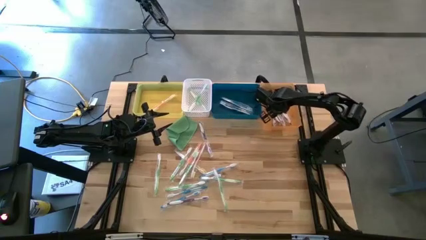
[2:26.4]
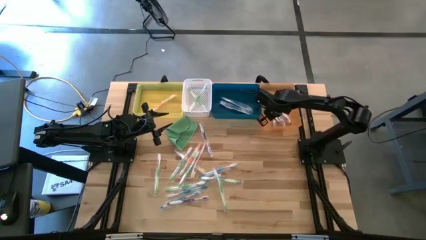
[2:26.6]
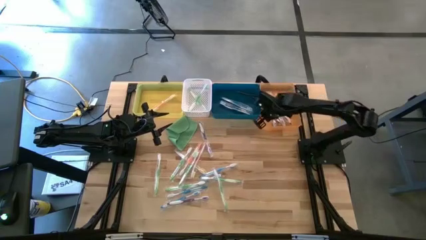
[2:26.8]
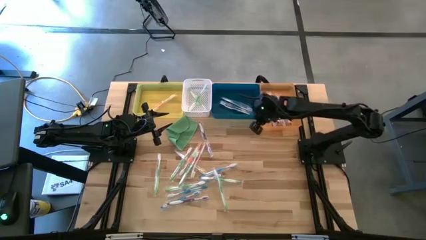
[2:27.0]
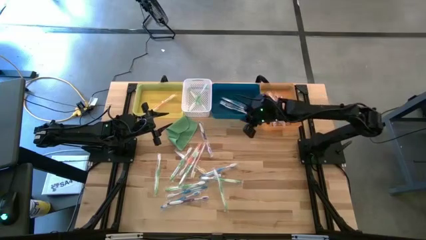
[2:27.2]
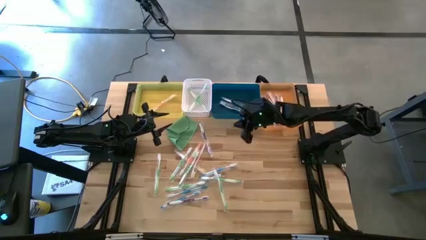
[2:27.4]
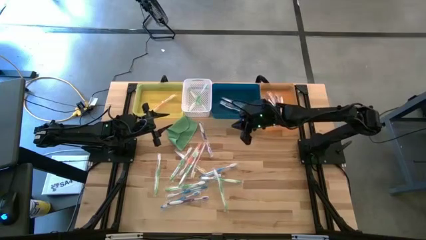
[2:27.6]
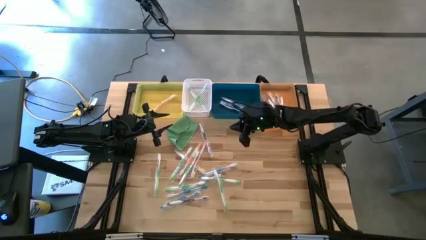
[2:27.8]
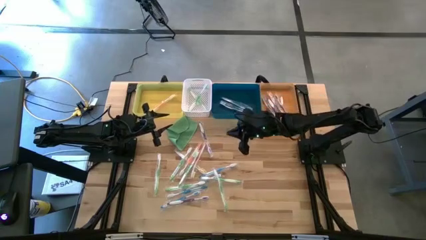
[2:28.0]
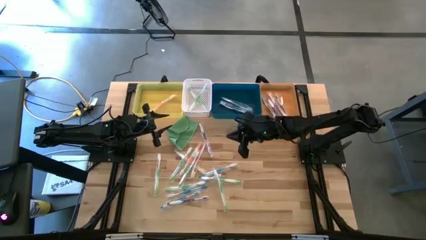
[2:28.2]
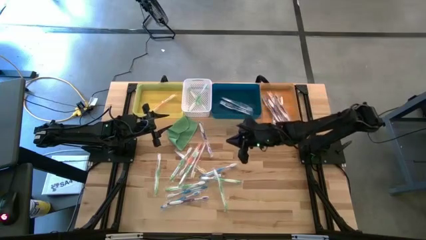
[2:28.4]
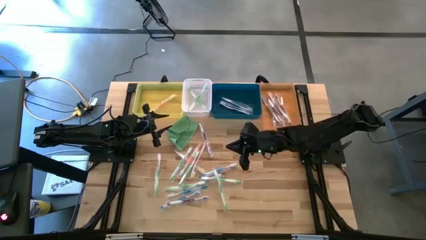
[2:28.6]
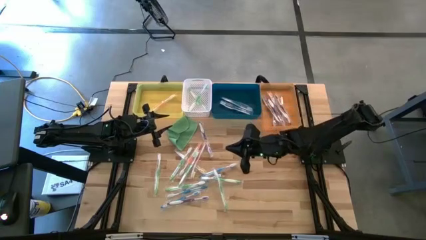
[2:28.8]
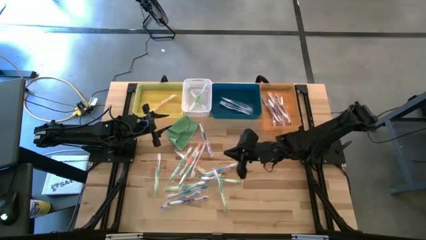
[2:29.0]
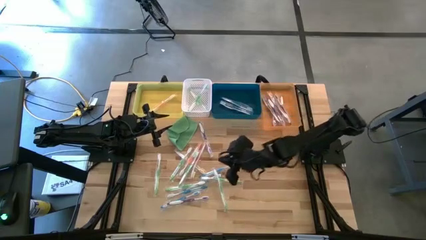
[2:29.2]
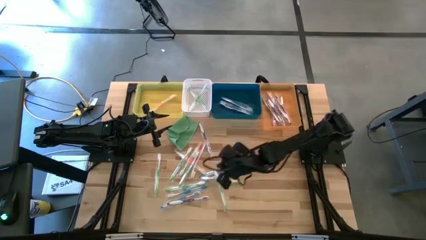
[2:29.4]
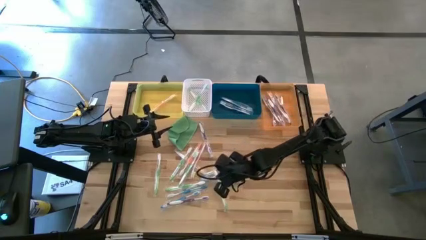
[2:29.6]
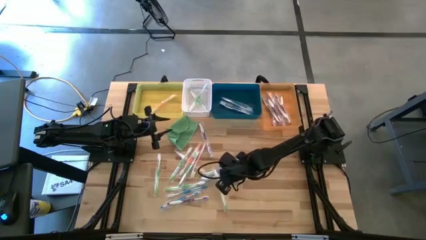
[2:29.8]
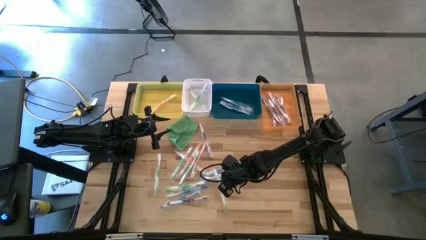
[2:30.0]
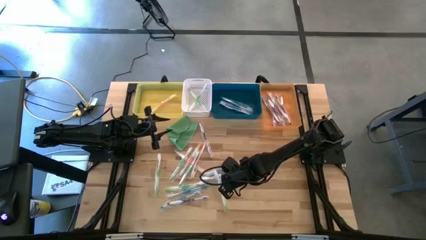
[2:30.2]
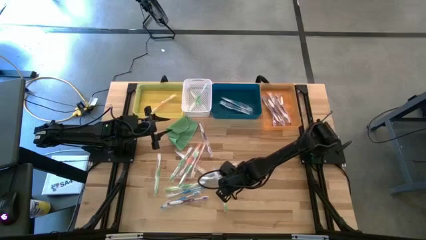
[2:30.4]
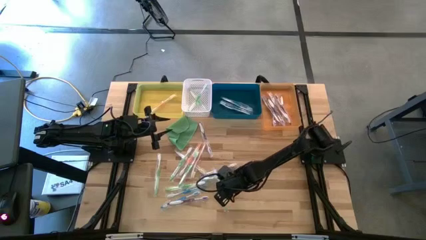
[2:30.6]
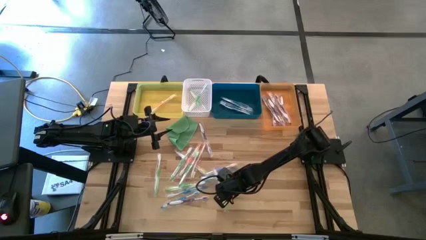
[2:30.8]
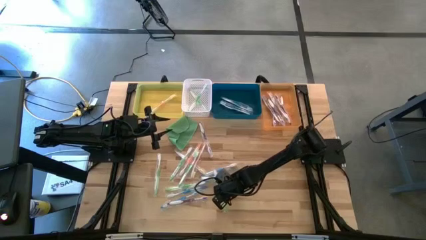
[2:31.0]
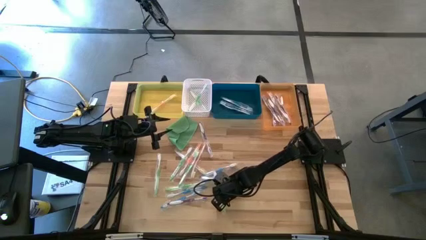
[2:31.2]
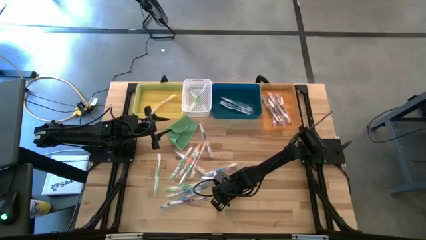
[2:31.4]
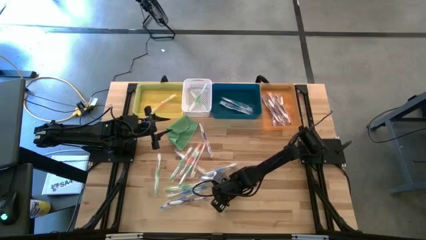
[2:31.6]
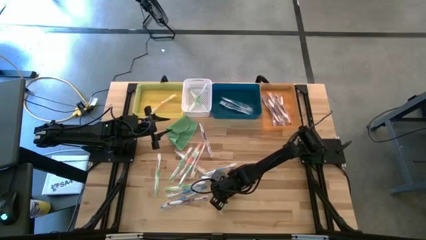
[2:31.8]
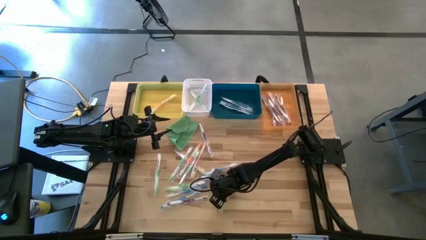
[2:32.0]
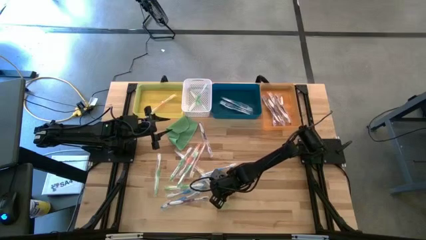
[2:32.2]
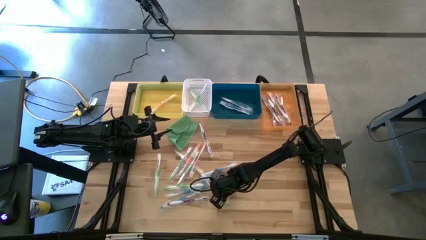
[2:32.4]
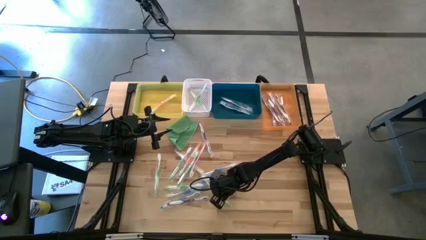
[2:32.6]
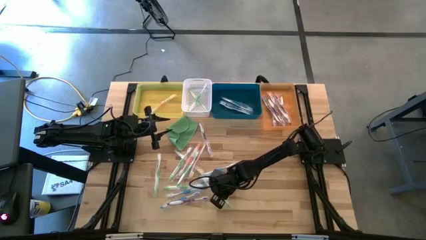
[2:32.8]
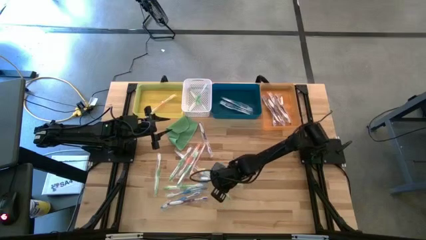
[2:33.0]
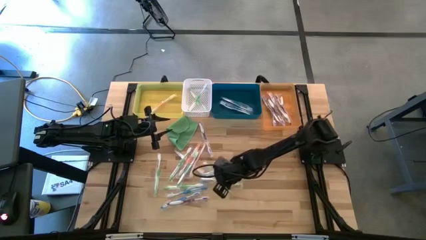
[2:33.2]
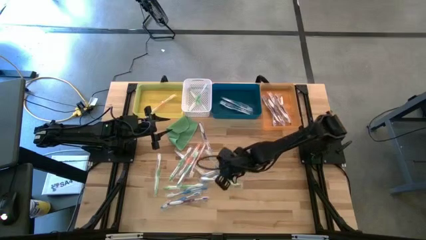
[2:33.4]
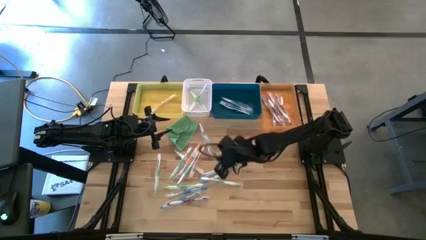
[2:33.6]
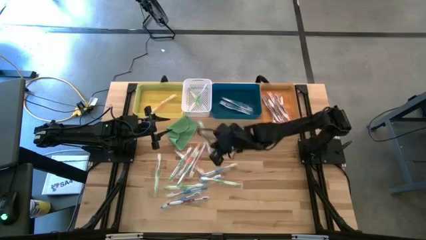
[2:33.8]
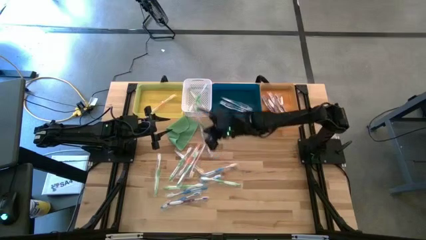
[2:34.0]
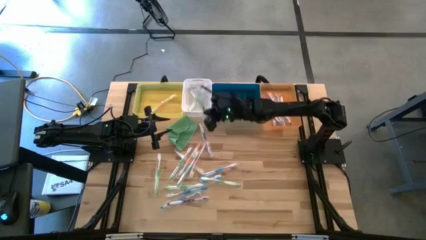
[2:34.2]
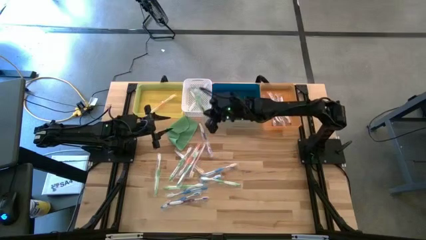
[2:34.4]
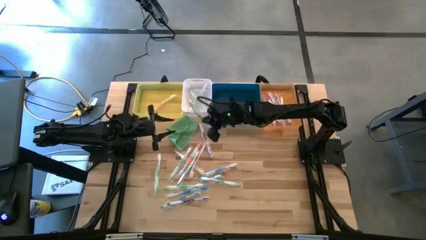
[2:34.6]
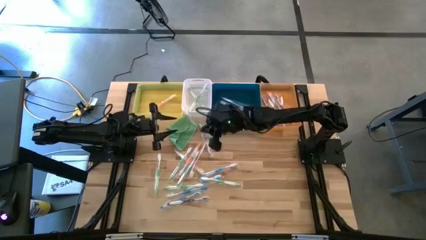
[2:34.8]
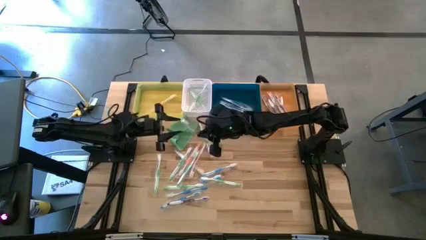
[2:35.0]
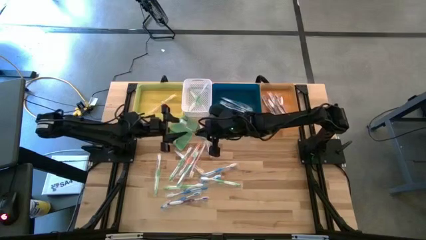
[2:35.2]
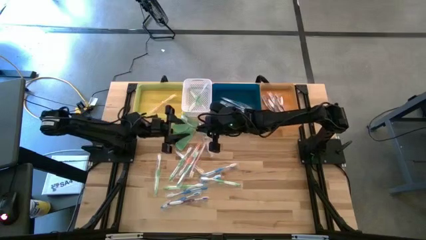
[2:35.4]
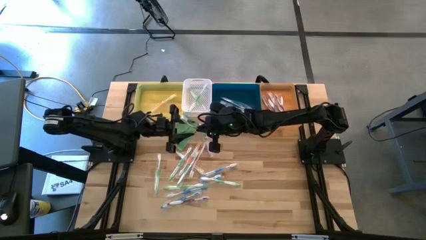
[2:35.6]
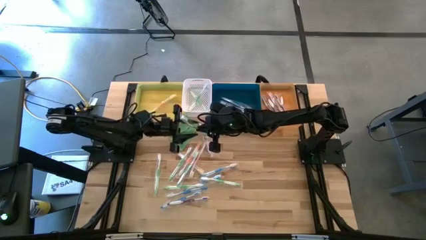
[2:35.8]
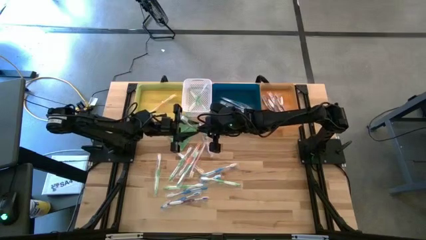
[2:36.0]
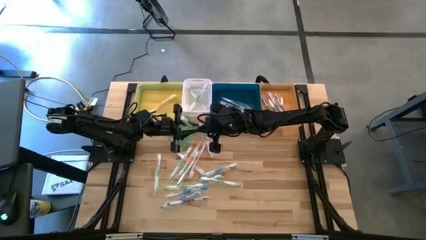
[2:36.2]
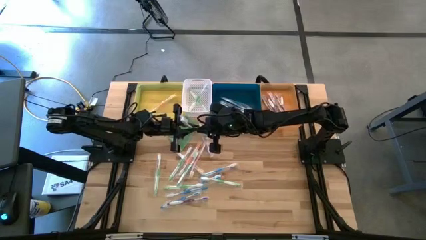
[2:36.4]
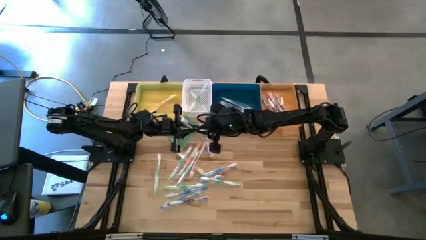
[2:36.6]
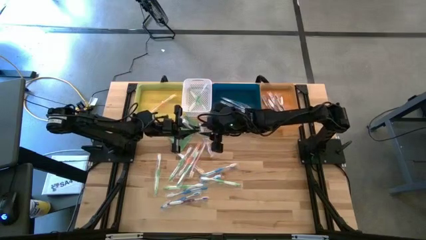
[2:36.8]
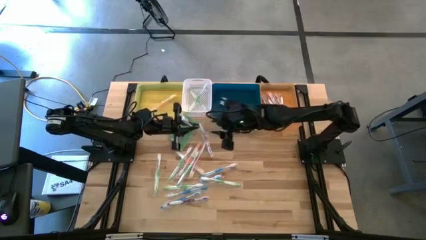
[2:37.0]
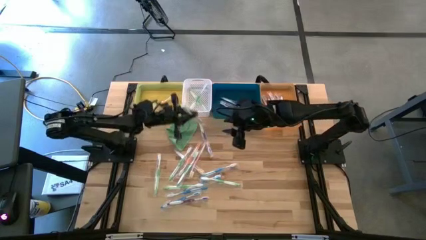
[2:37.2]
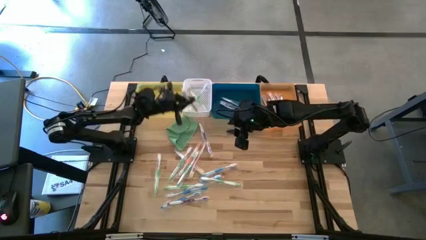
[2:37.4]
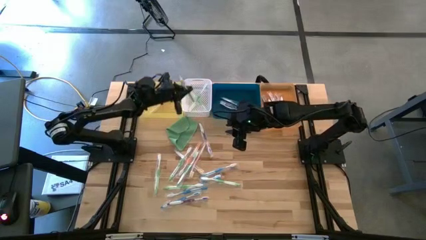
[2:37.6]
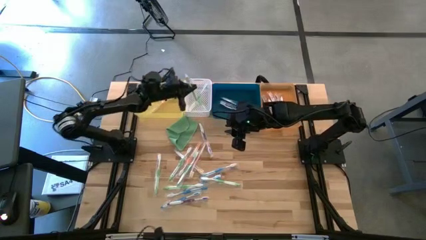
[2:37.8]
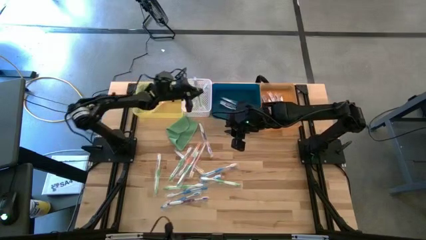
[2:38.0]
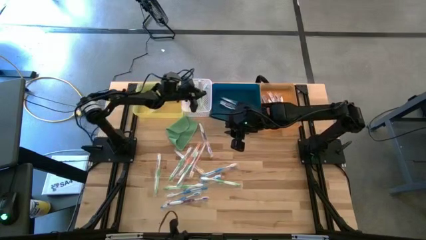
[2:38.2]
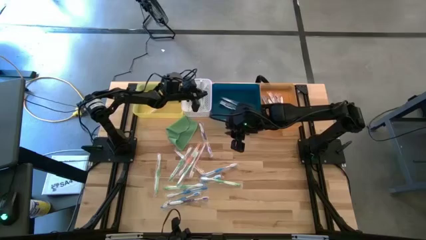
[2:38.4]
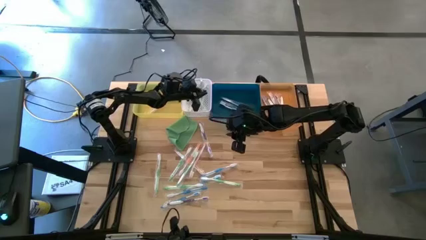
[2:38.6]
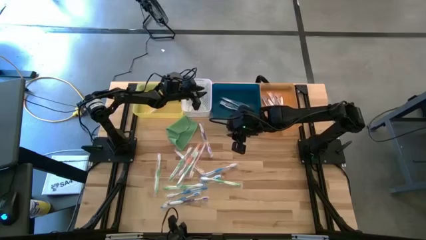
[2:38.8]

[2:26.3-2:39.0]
Task: Pick & Place Toothbrushes
Put the green toothbrush into the white bin

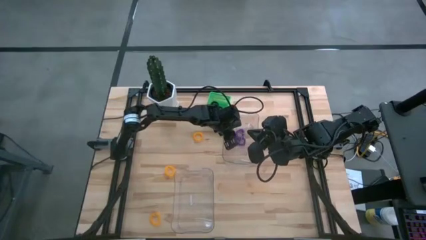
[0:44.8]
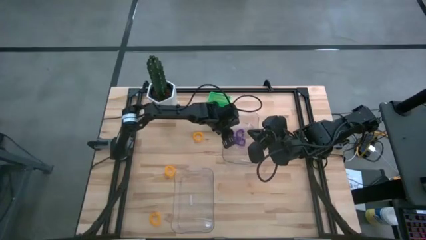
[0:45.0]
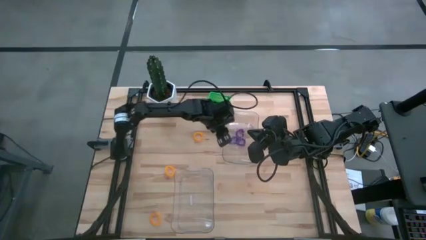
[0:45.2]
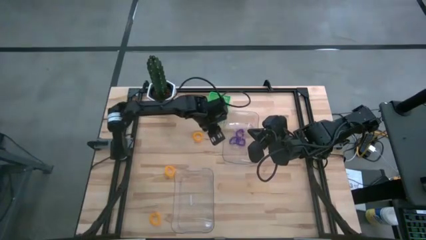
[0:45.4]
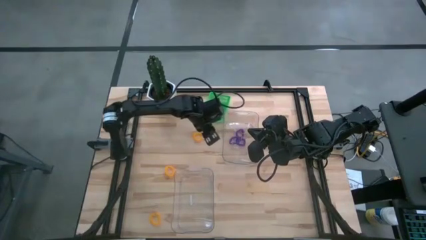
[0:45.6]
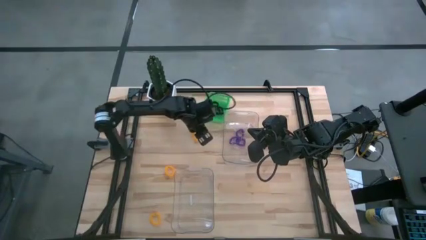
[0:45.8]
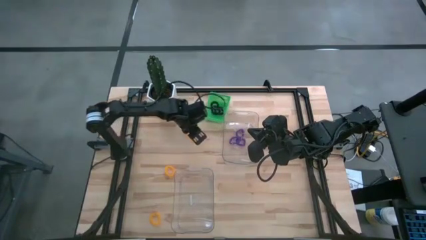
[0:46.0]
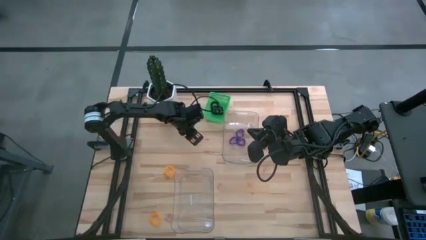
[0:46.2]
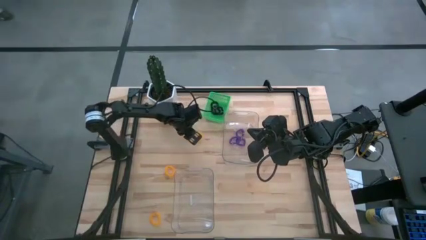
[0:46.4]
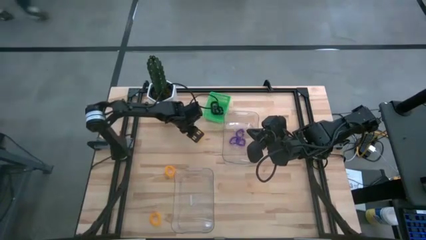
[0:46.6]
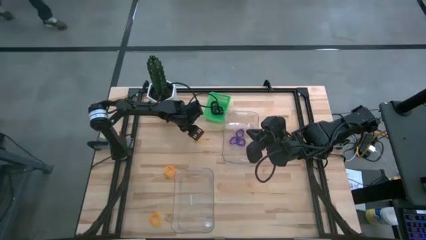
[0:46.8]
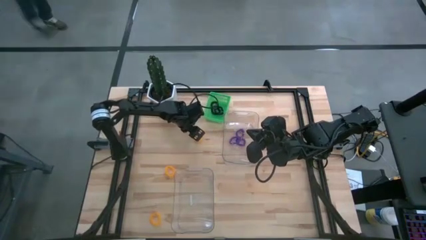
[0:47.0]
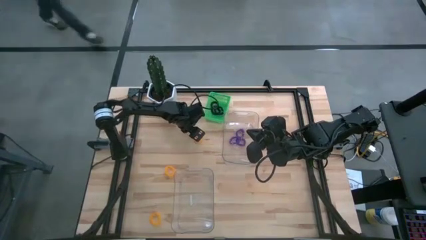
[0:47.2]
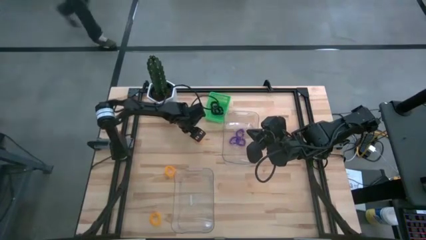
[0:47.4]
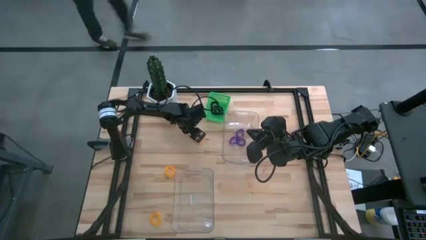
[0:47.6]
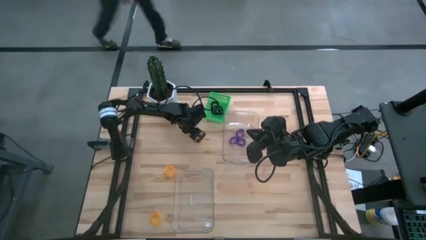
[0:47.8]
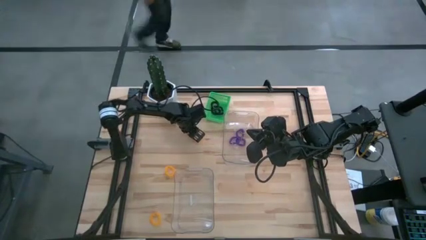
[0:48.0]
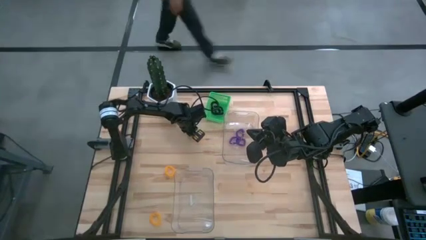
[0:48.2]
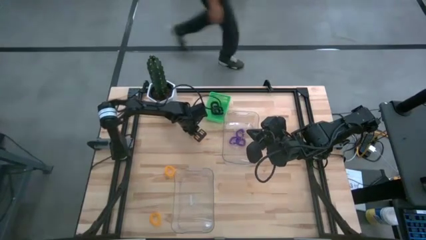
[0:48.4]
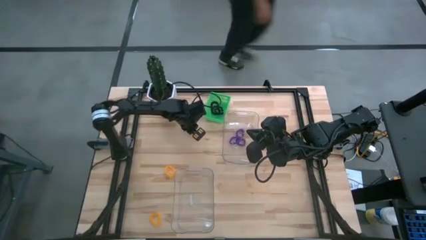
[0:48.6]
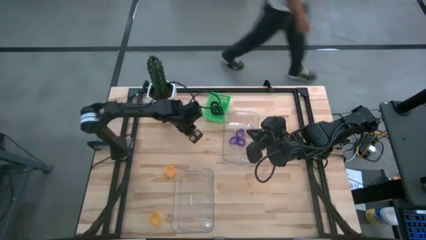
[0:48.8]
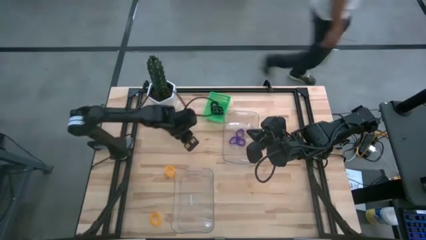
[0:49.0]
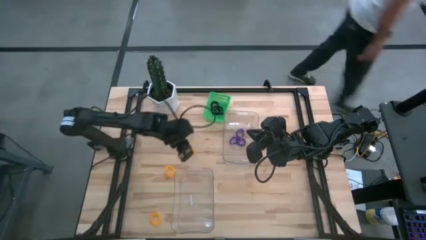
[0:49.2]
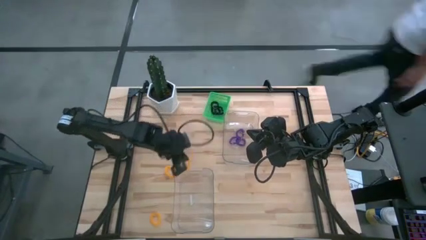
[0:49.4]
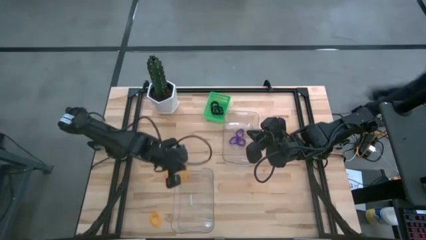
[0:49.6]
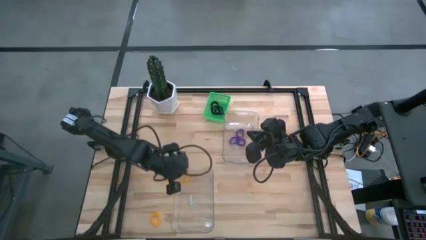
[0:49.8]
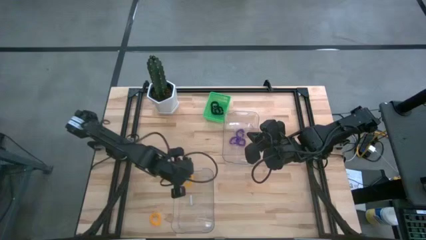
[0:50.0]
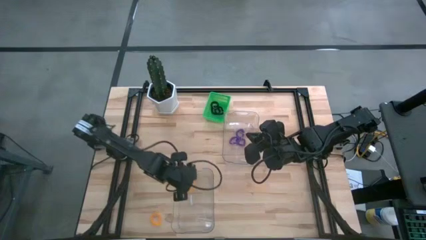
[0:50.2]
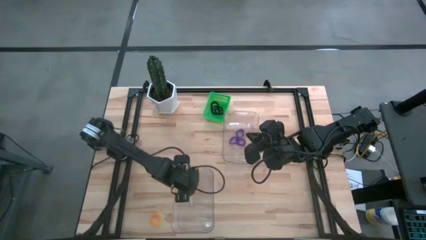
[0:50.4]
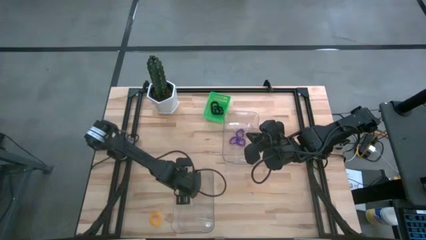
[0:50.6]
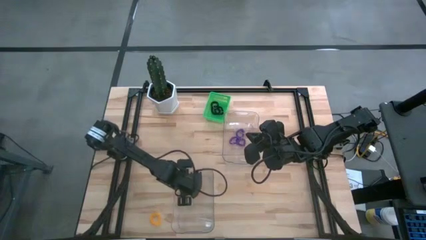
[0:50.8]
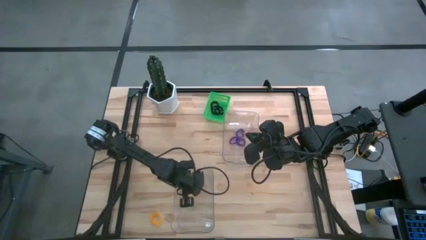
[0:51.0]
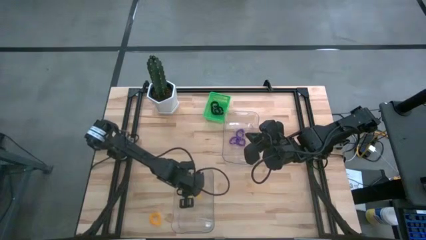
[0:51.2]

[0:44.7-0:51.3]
Task: Sort spring keychains
Put the top yellow spring keychain into the bottom transparent bin
